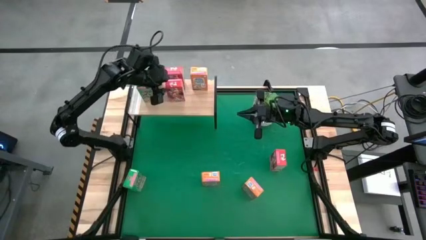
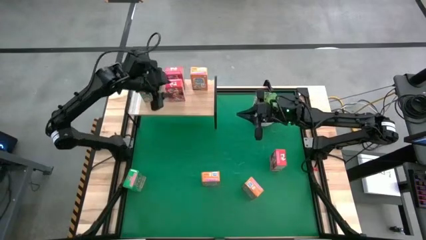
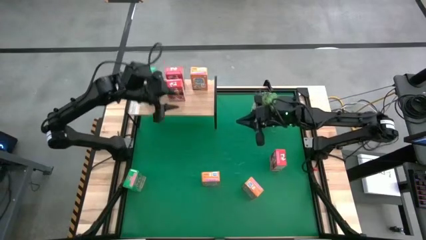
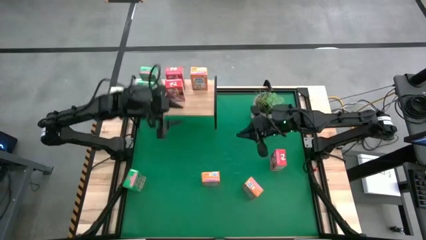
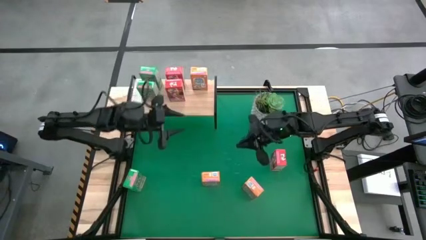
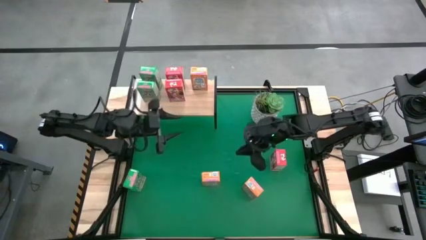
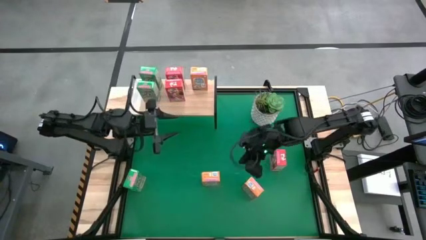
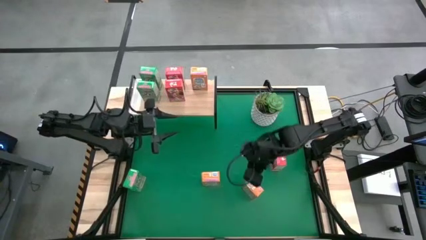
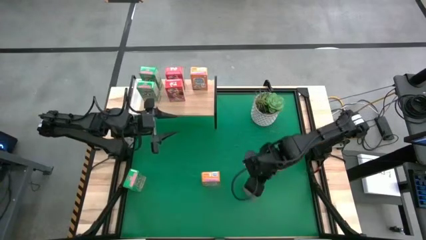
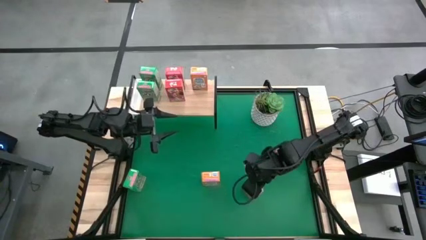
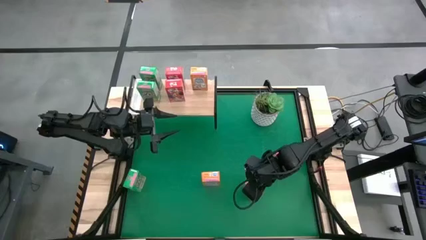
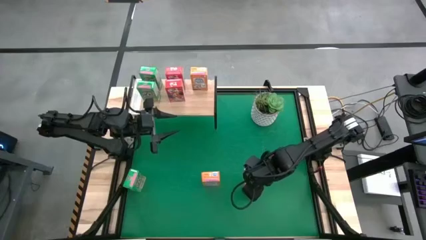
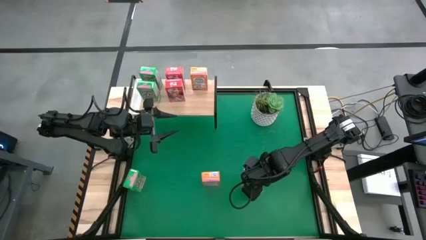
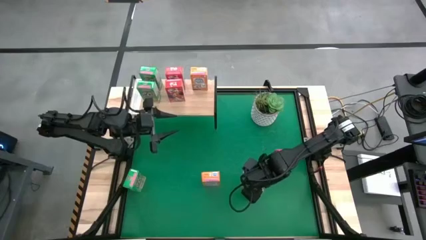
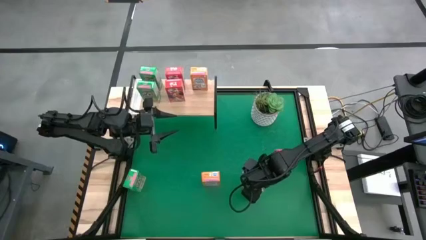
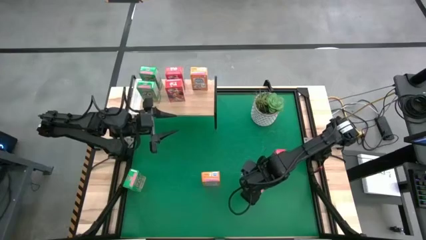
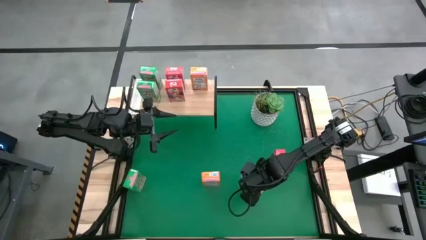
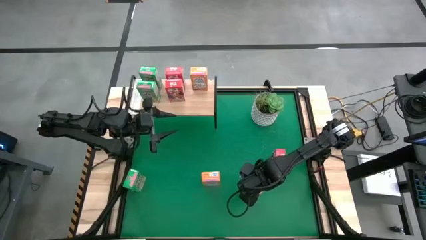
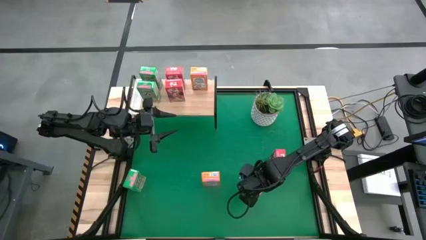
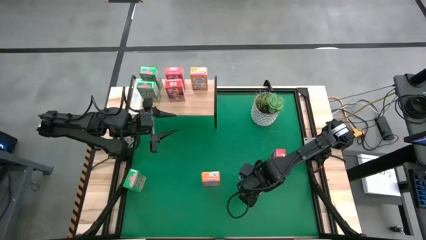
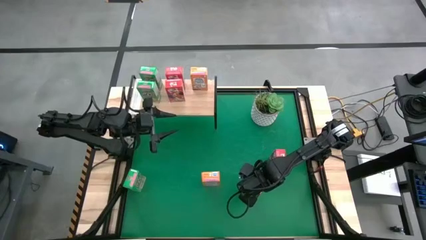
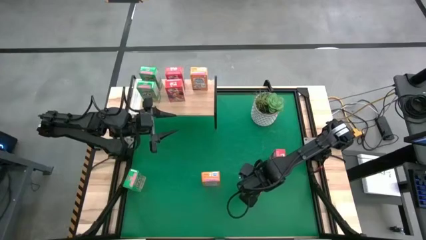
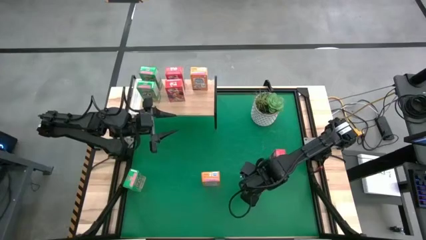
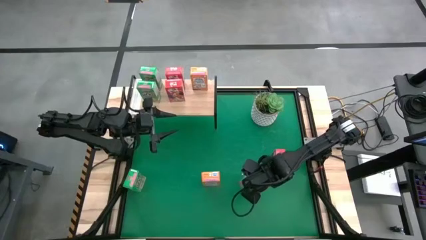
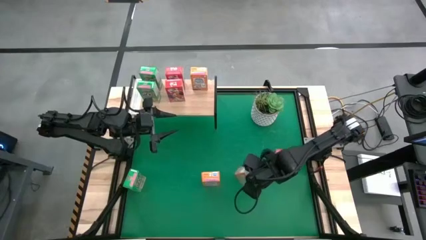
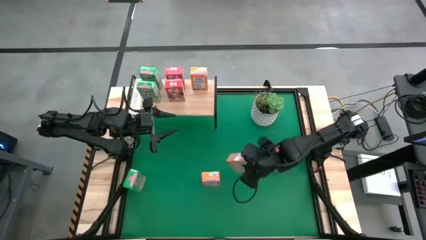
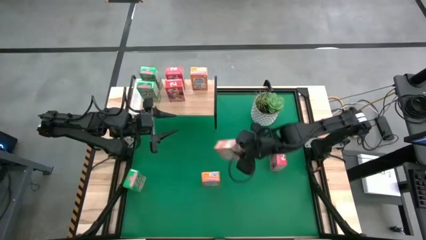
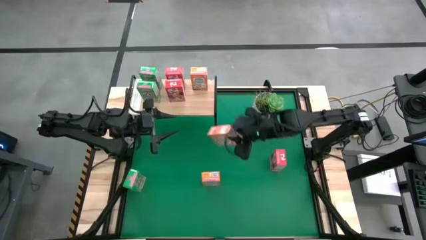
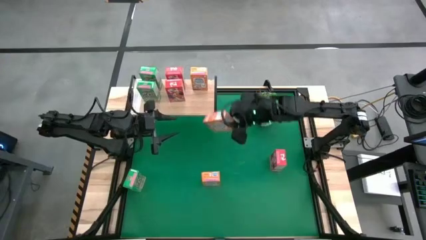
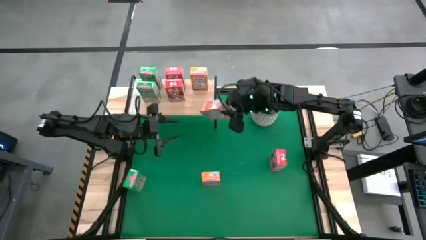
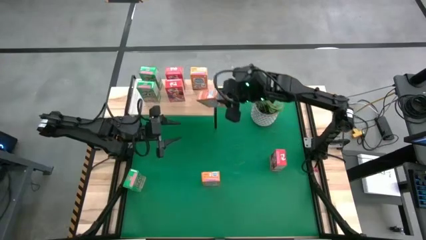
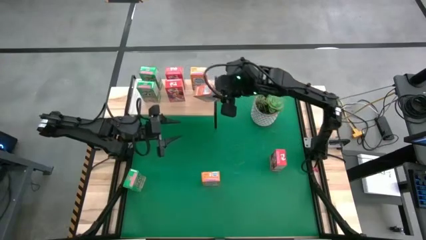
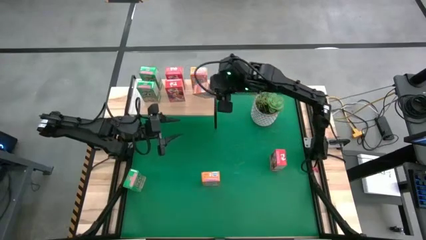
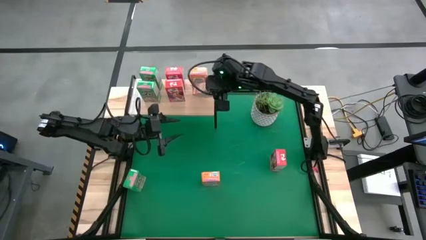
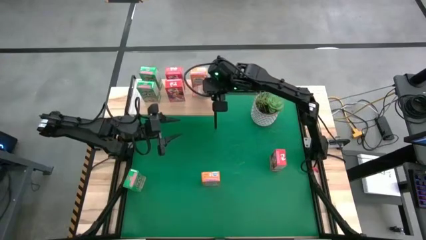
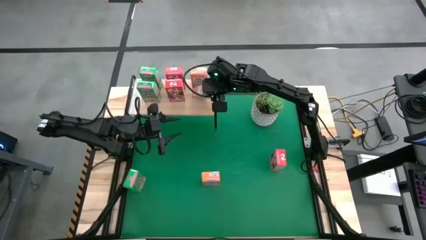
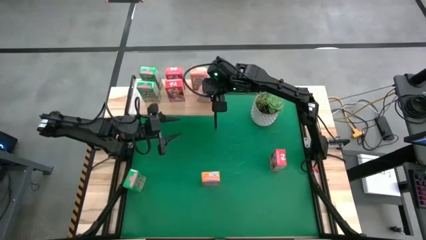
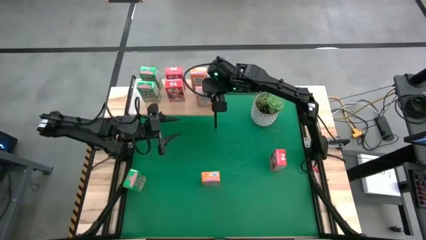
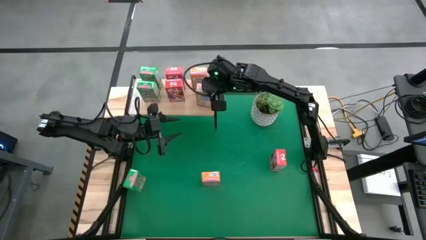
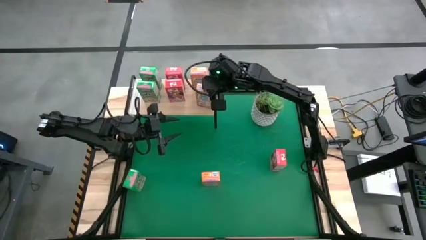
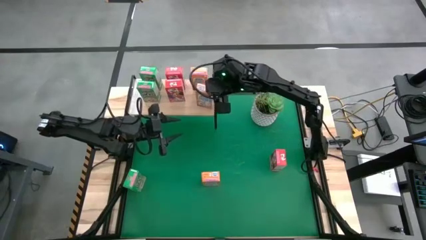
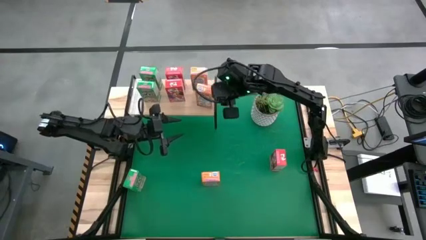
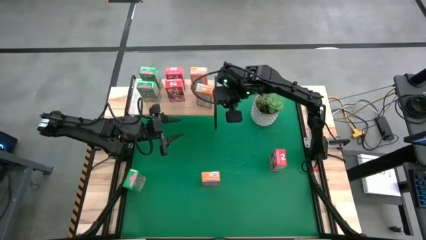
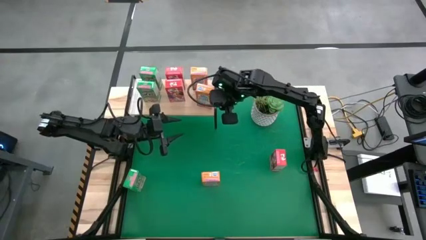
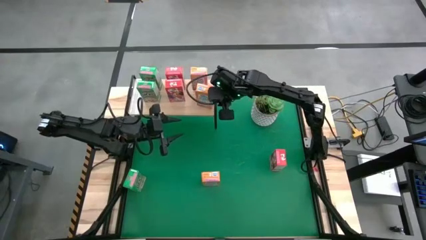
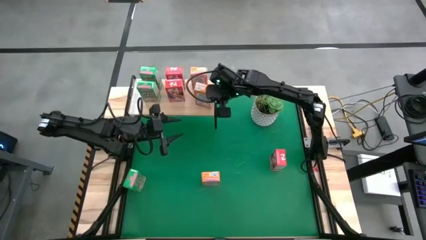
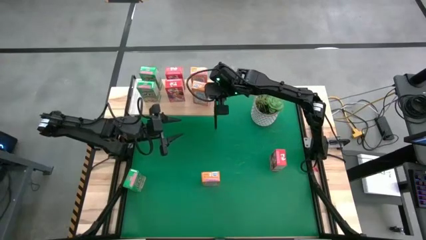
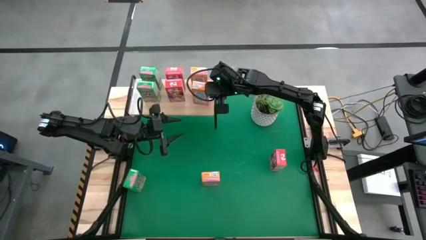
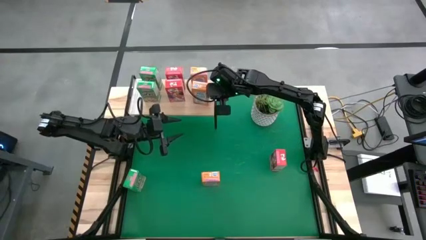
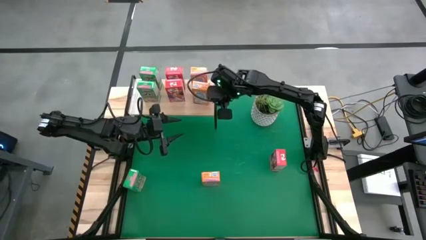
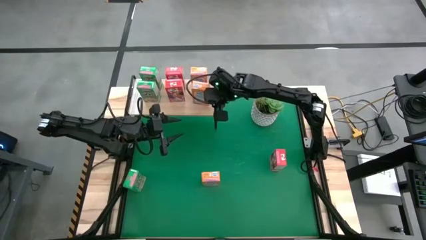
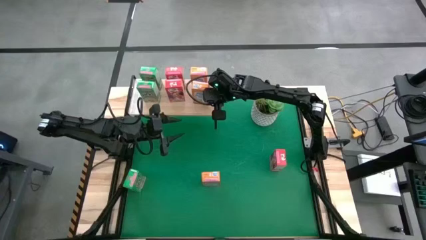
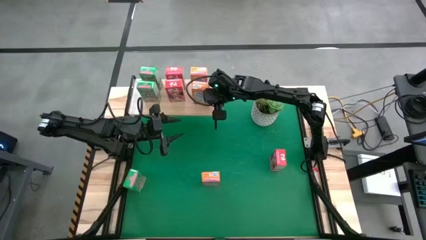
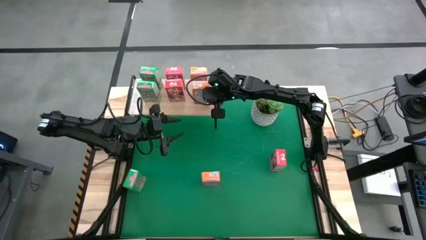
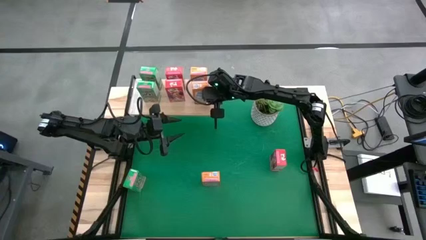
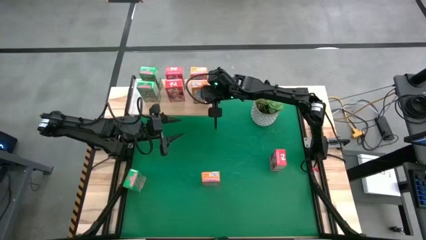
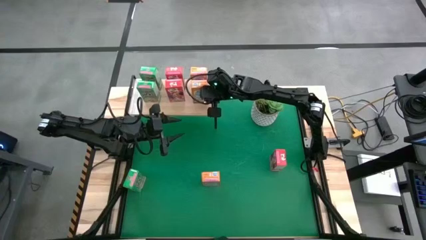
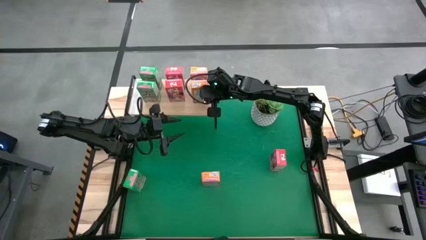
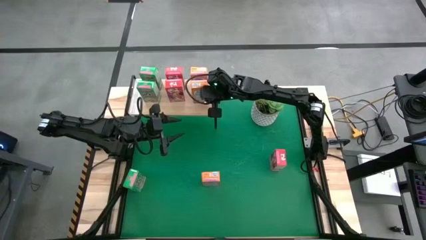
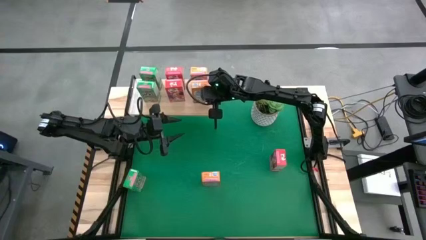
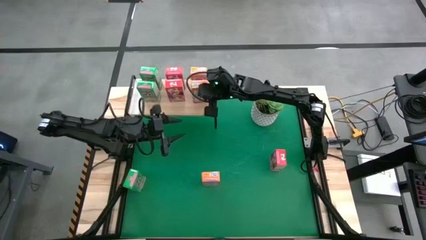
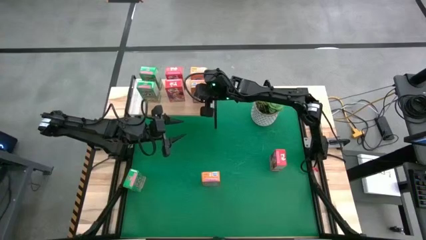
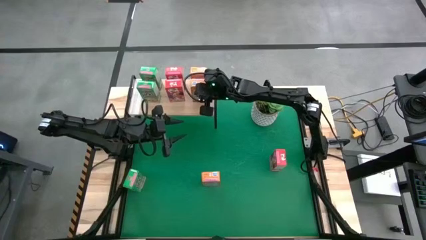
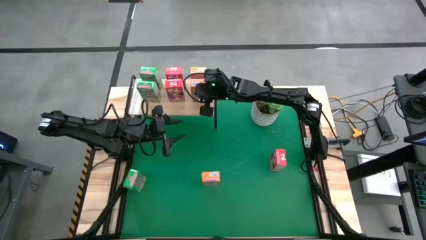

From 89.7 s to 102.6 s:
Task: Stack cereal on shelf
Put the right orange cereal box on the shelf aligned with the other orange cereal box

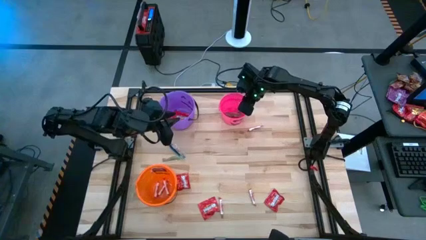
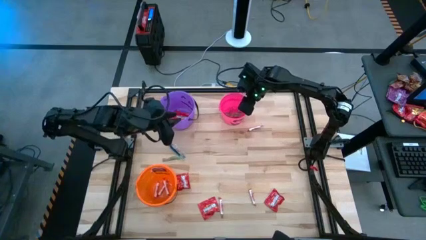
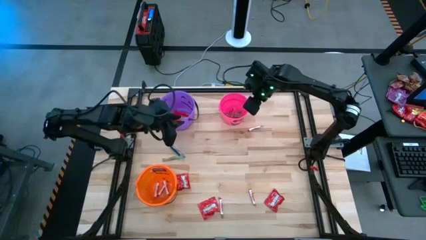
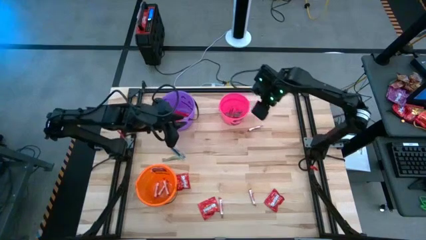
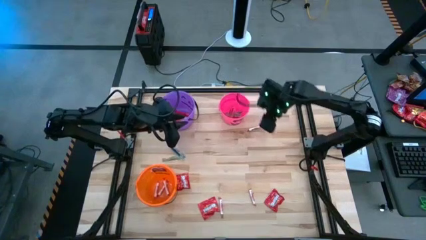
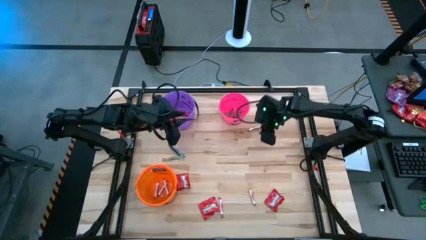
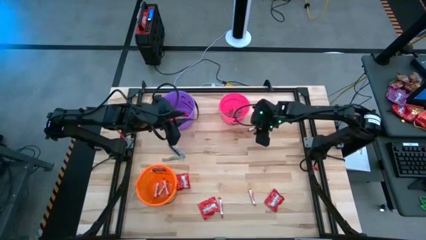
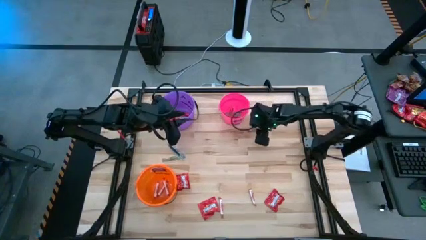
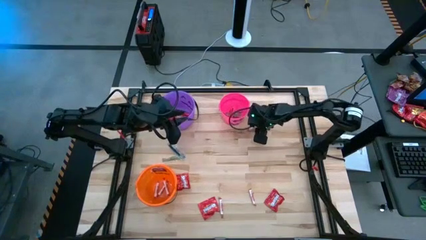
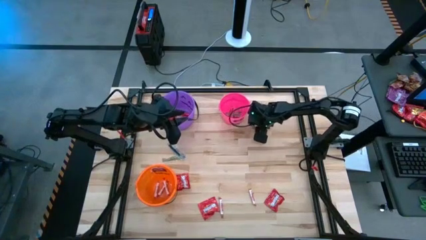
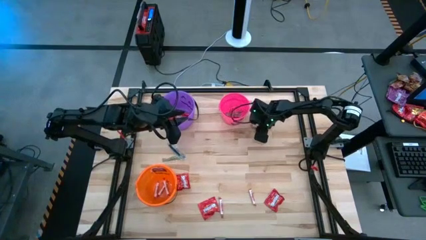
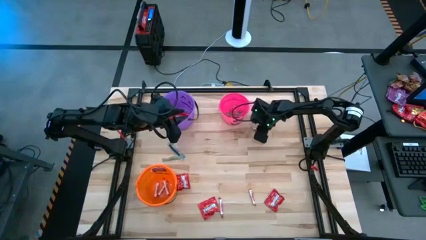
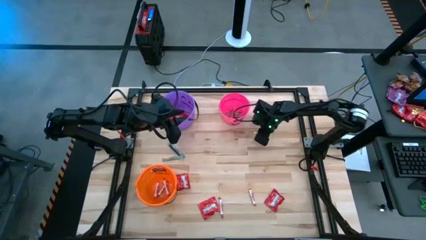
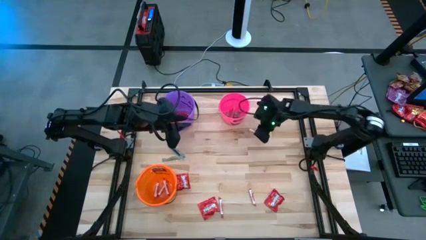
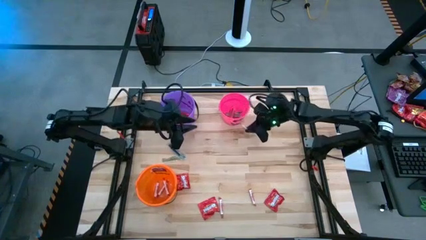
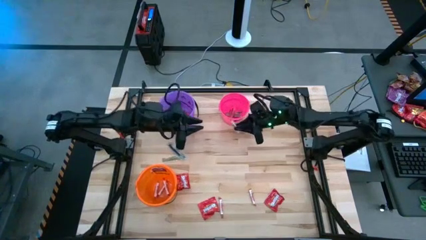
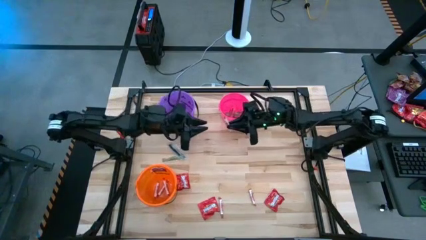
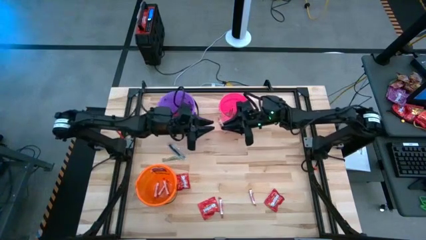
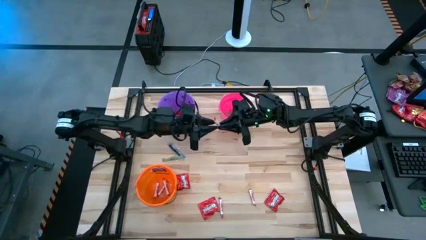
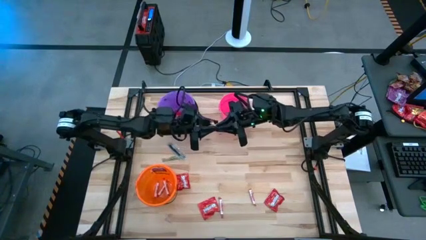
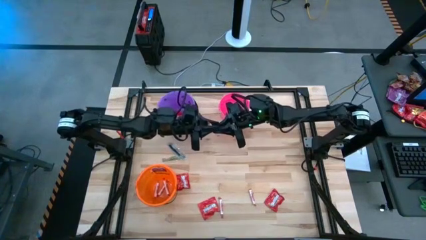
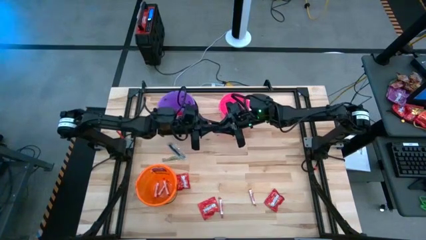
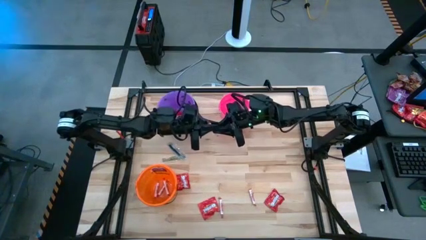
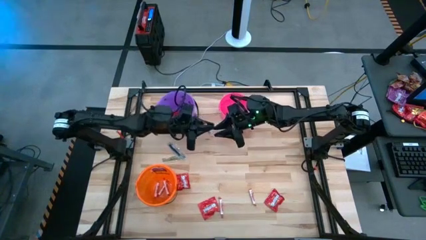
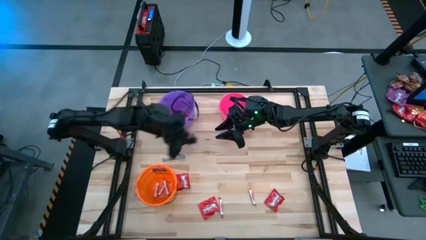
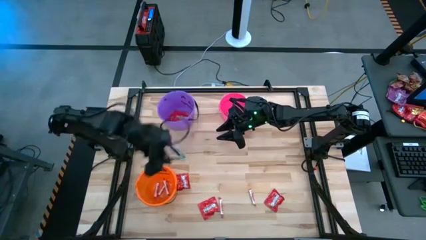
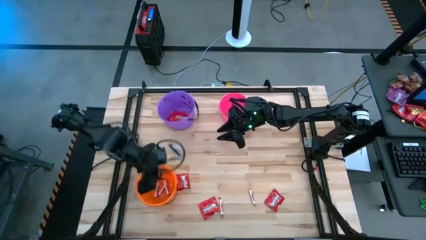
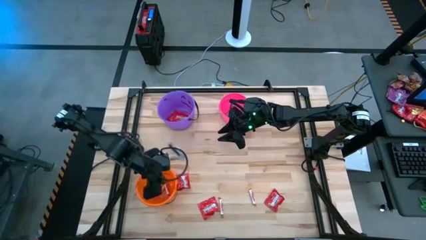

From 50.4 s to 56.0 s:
Task: Sort candy by brand, put in halloween buckets
Put the white candy into the orange bucket
